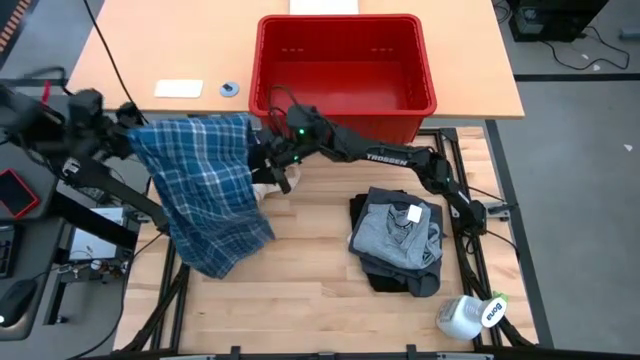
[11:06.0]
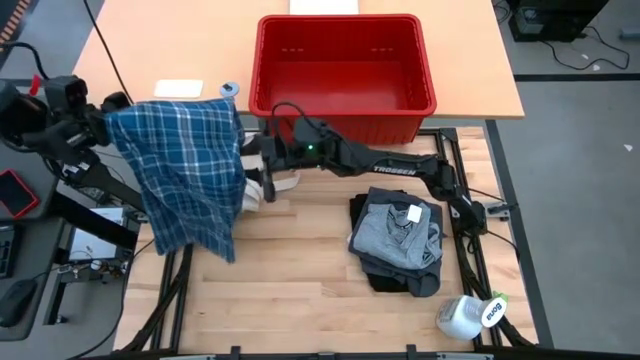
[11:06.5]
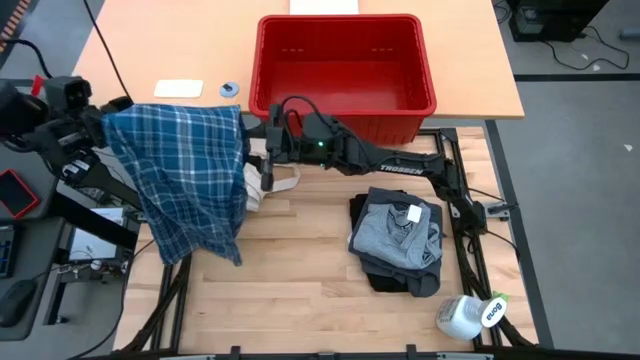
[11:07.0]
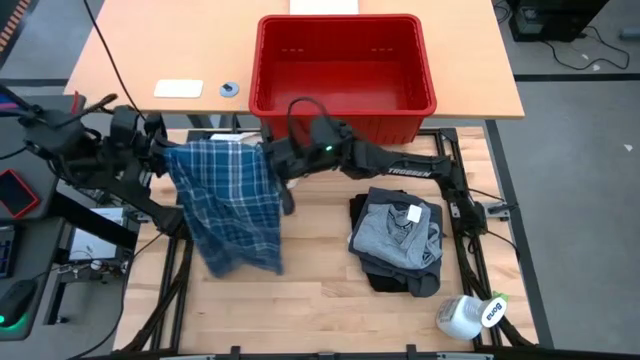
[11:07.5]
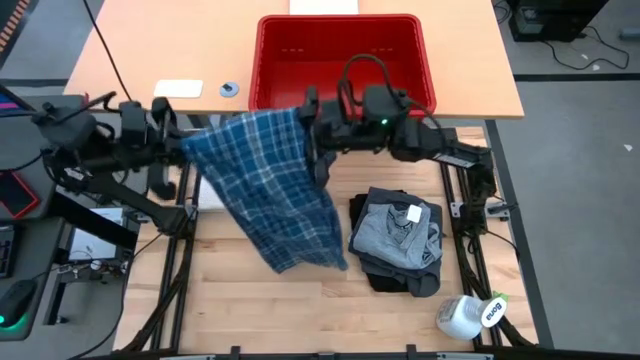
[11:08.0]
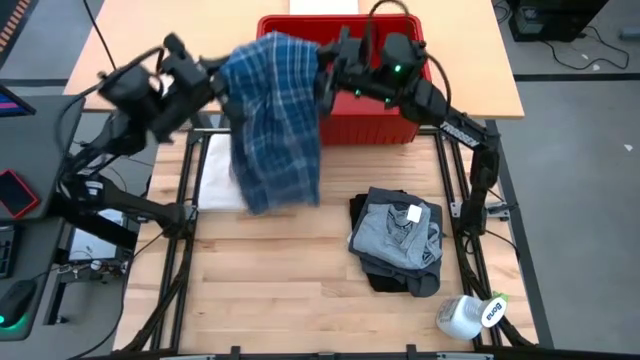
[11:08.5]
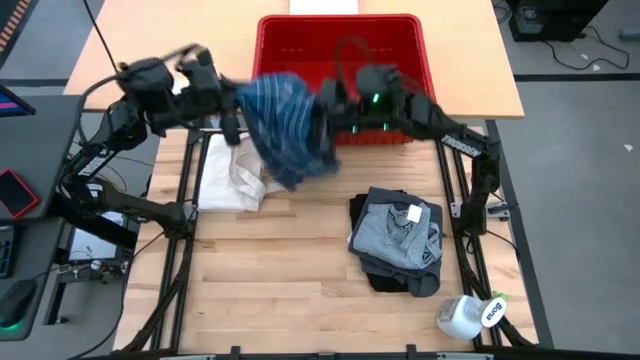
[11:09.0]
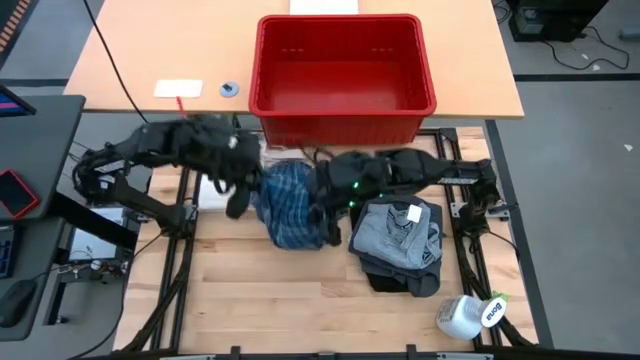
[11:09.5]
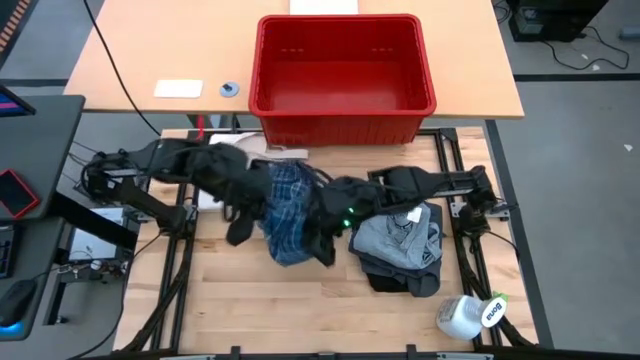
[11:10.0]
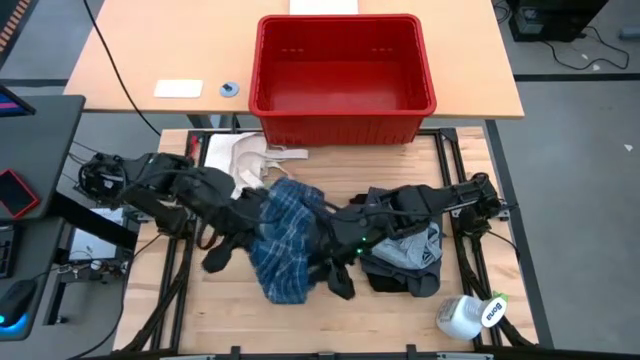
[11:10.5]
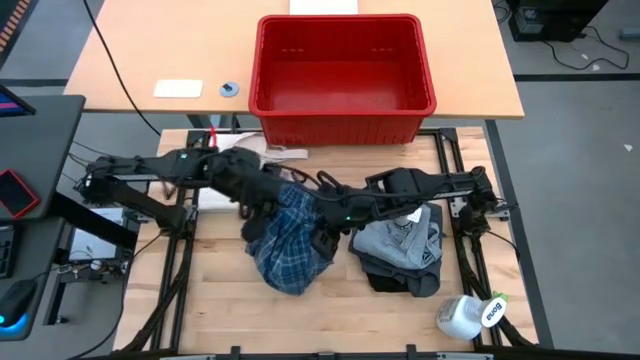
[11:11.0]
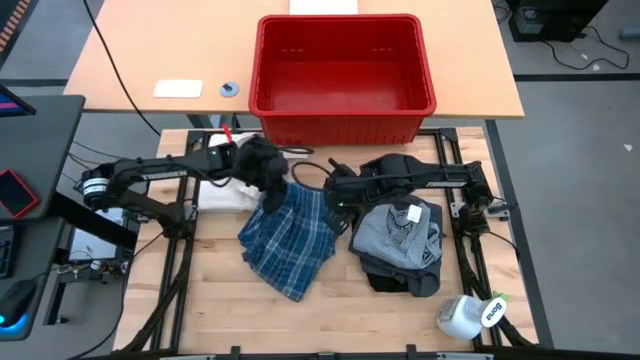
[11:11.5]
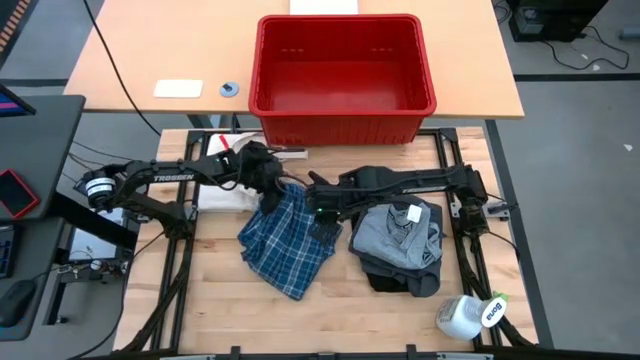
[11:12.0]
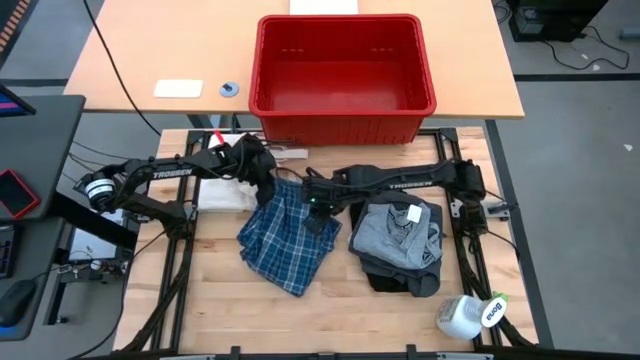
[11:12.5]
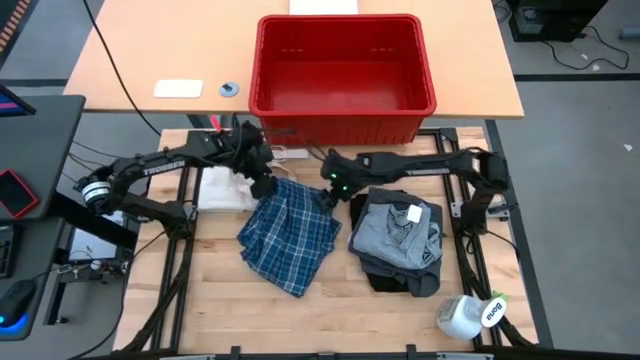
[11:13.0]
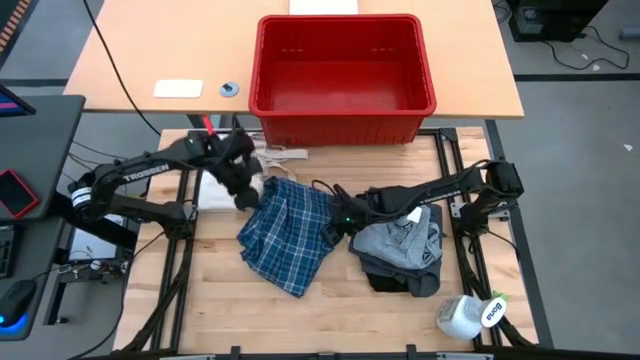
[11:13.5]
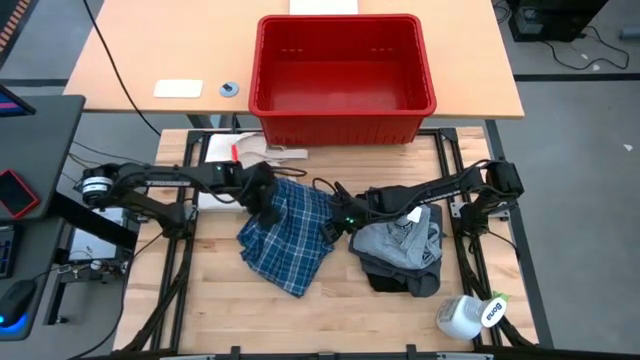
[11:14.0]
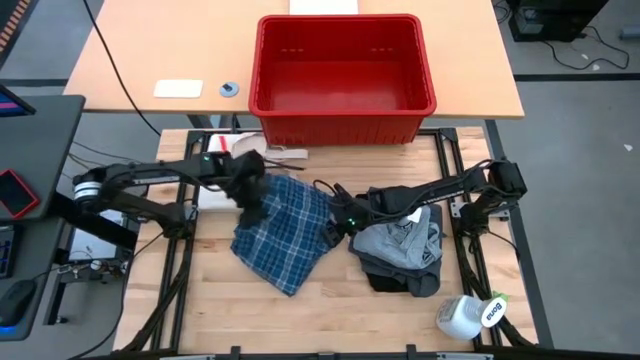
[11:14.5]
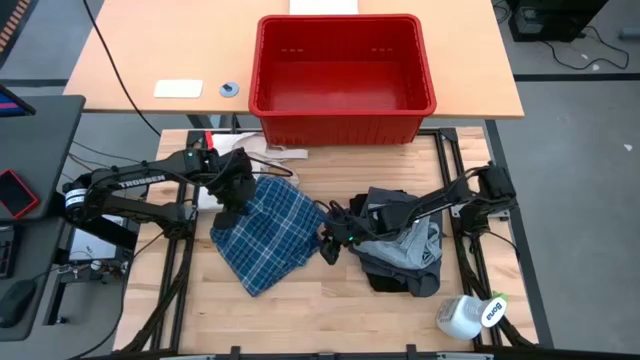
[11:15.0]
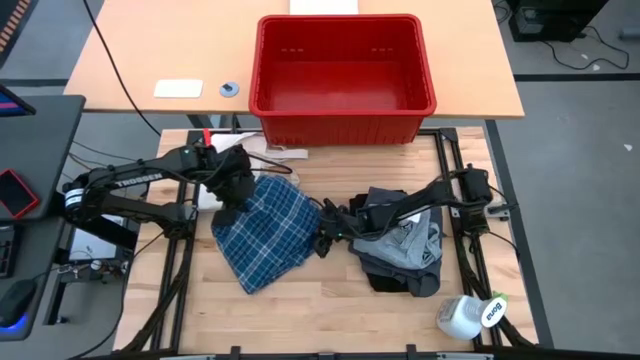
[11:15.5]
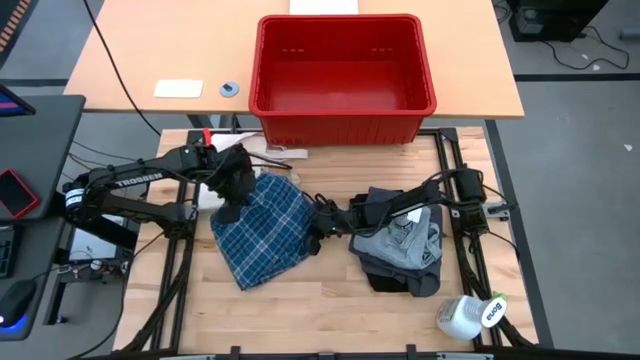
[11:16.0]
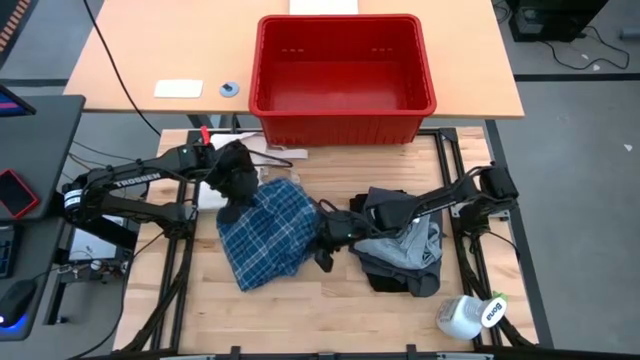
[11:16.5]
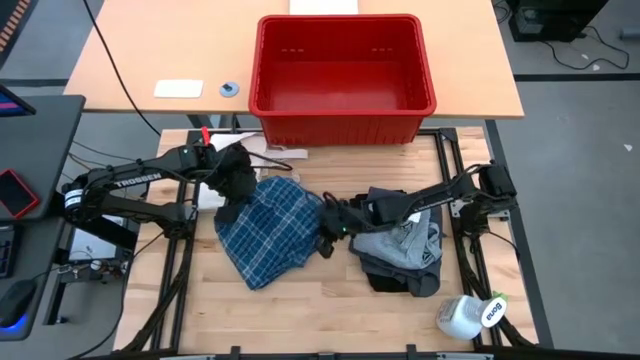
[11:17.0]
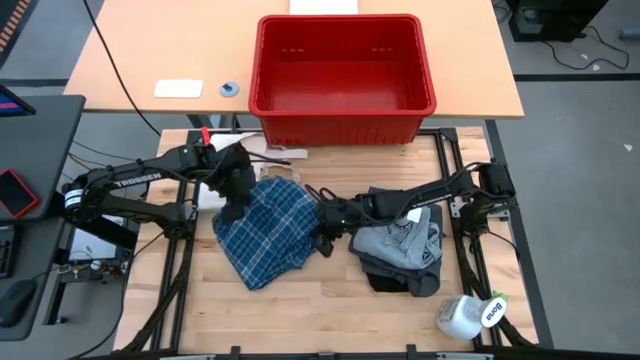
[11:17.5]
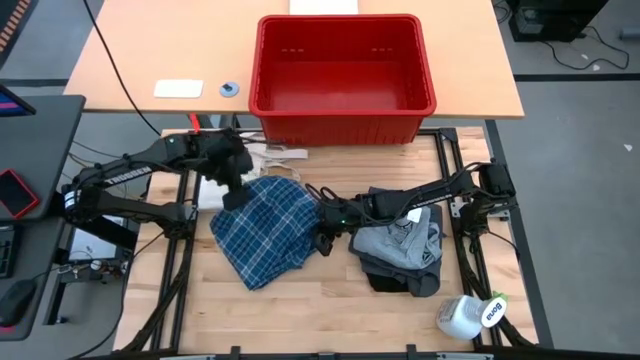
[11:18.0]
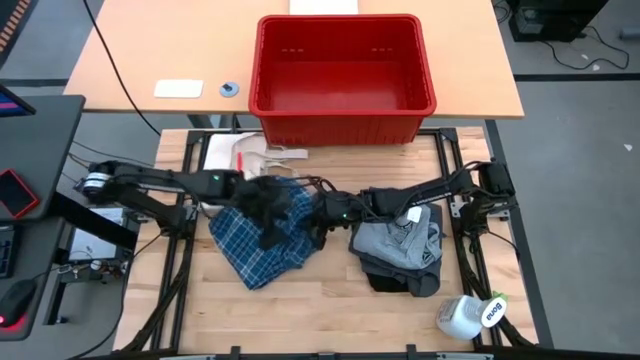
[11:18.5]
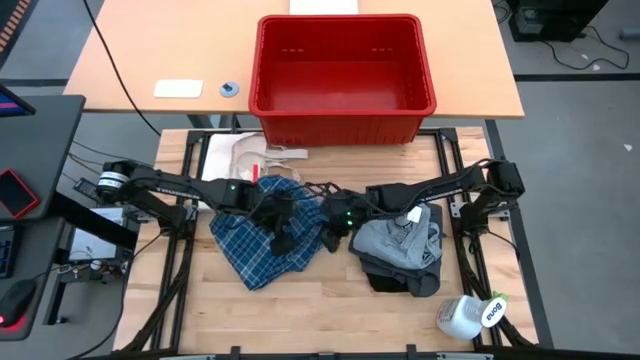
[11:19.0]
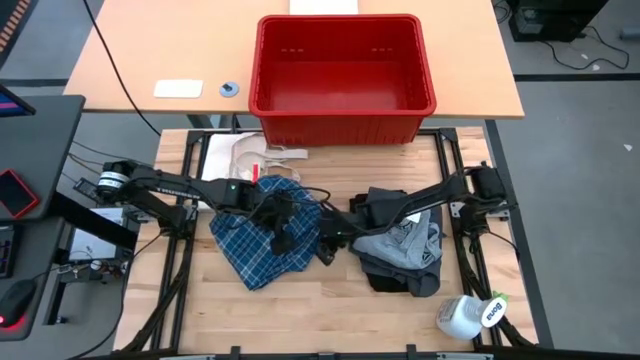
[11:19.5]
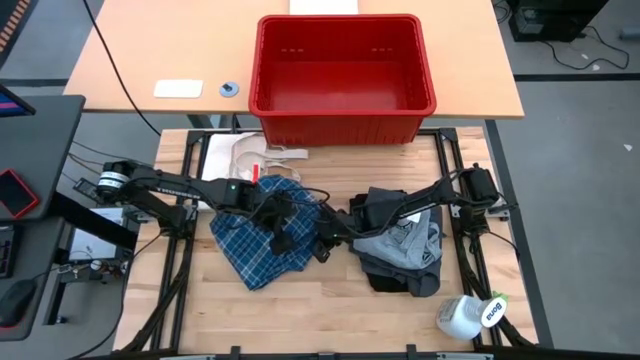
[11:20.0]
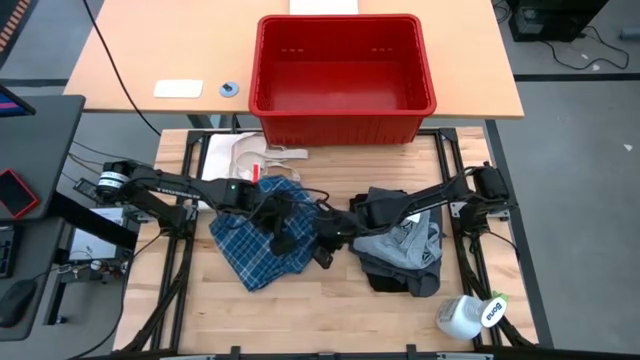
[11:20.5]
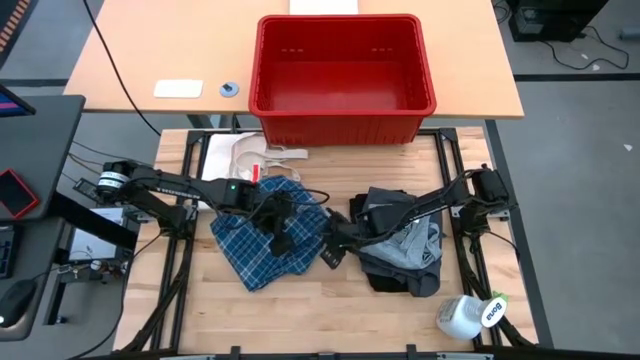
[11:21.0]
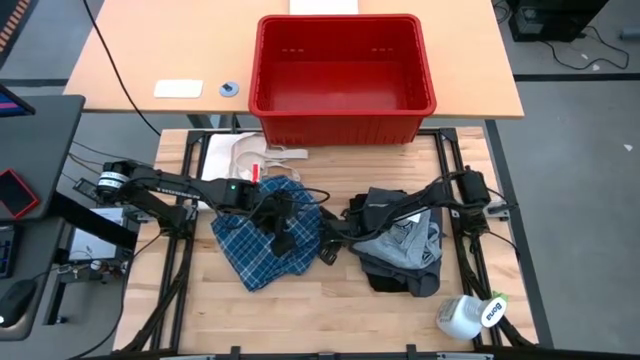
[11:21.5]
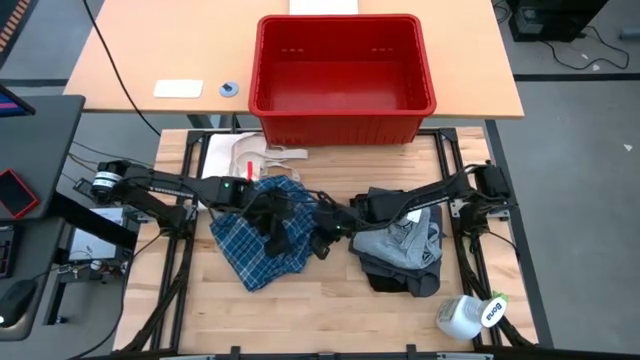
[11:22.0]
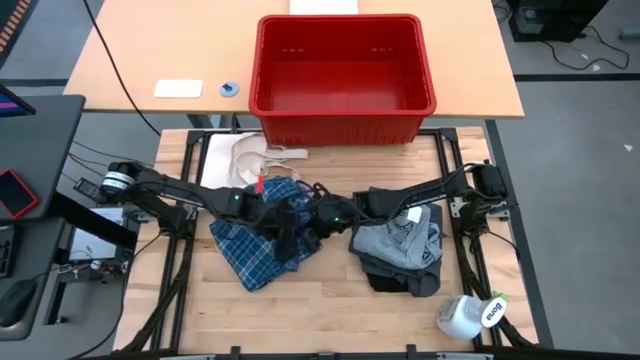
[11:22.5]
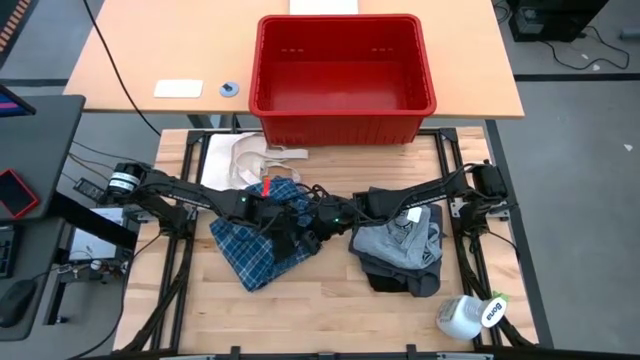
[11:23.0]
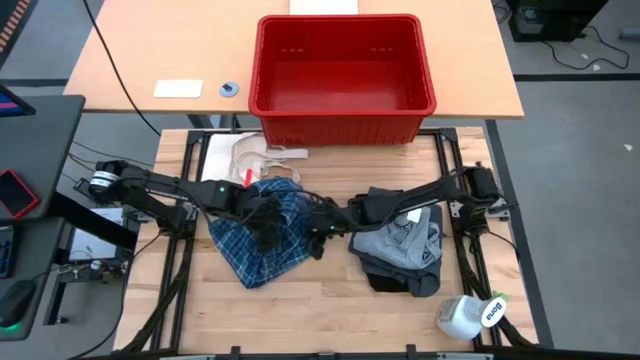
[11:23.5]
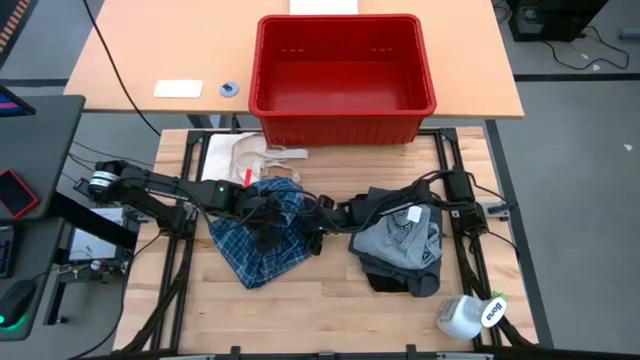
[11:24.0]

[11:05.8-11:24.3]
Task: Fold Laundry from Bin
Fold the blue checkered pants

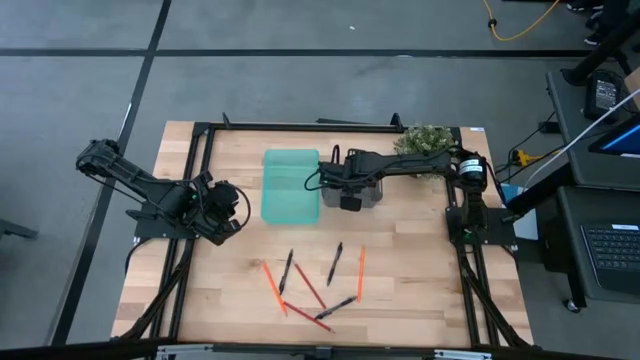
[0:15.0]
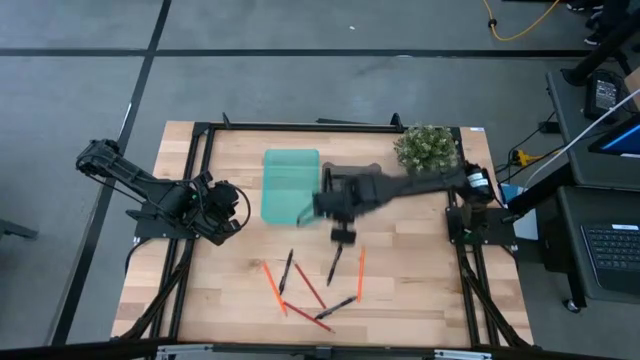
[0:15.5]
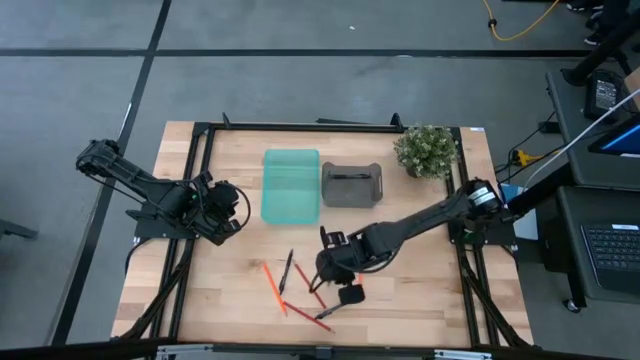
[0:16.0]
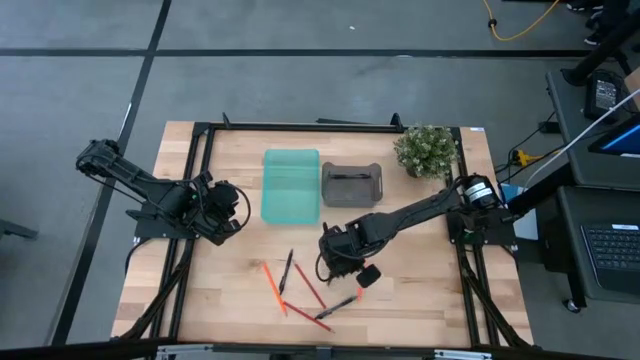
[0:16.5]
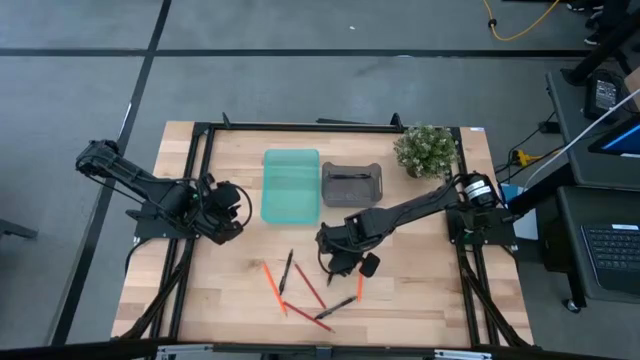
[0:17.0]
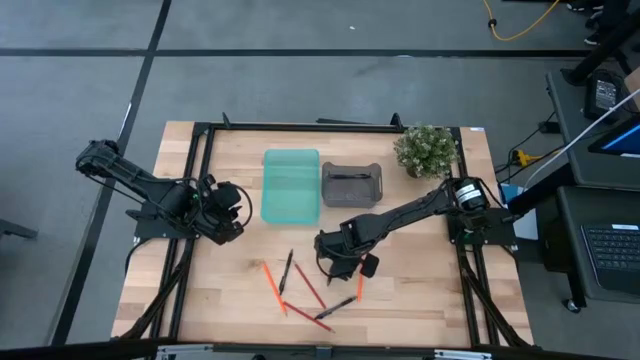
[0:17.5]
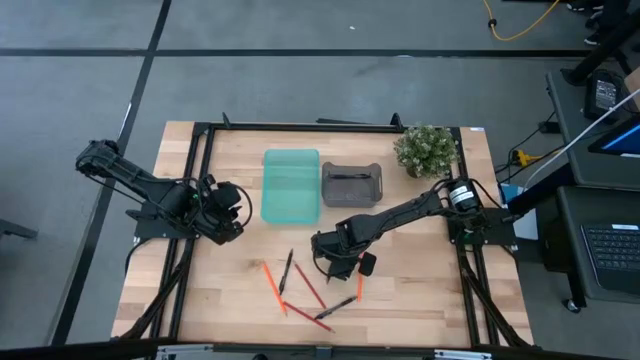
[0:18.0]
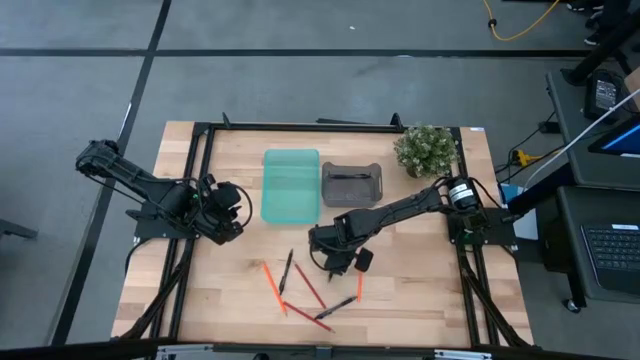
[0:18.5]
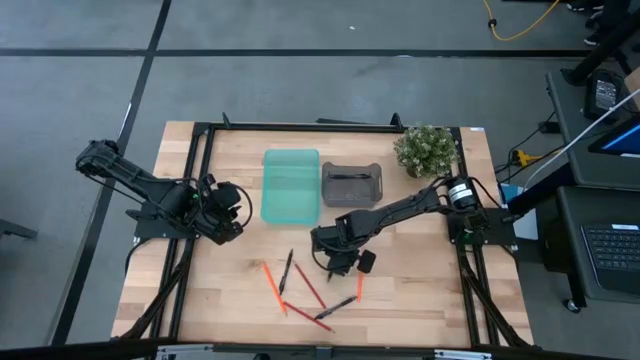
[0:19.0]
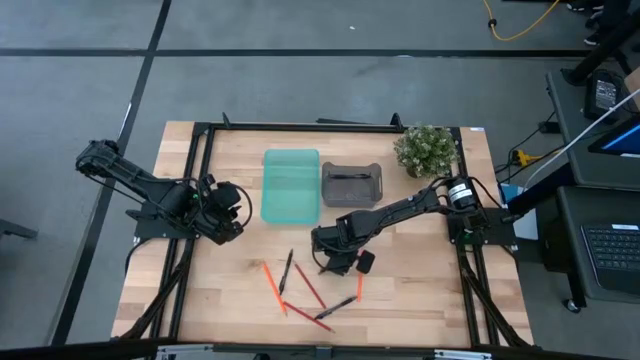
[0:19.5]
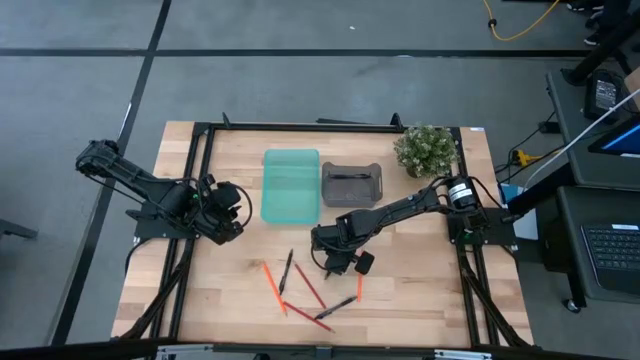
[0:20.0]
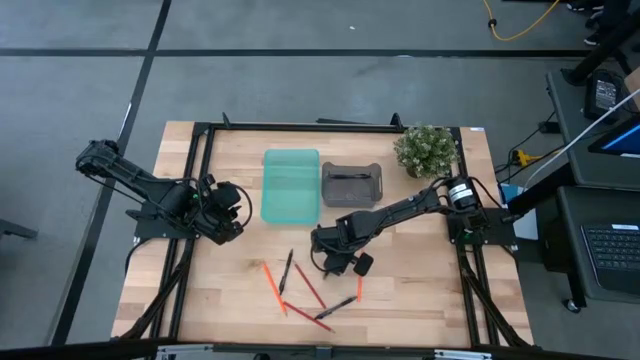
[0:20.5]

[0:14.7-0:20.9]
Task: Sort pens & pencils
Put the black pen into the black bin
